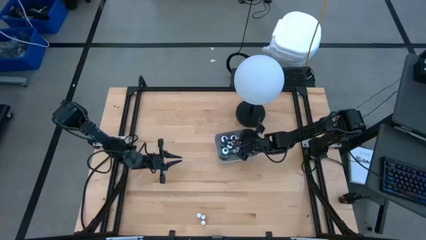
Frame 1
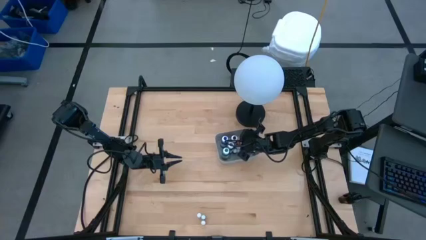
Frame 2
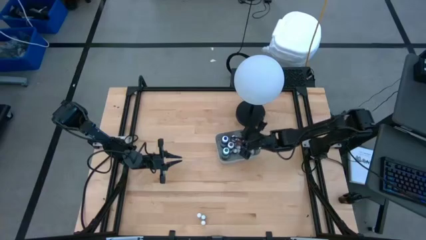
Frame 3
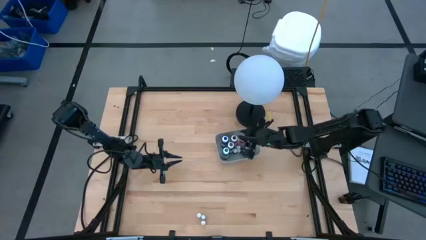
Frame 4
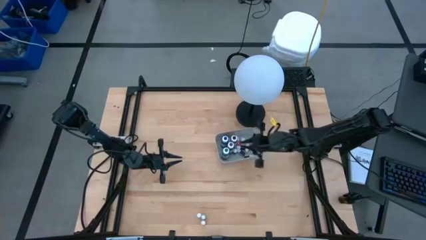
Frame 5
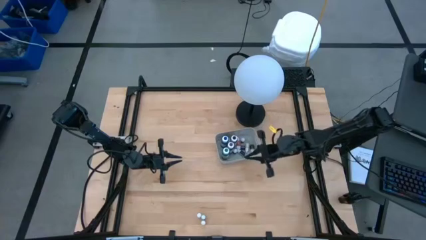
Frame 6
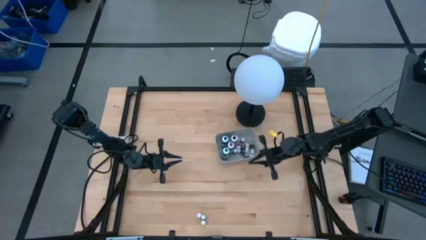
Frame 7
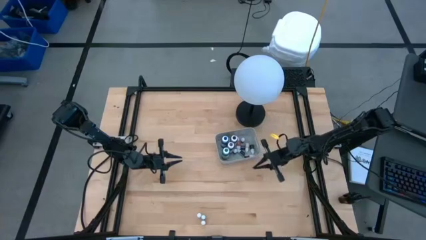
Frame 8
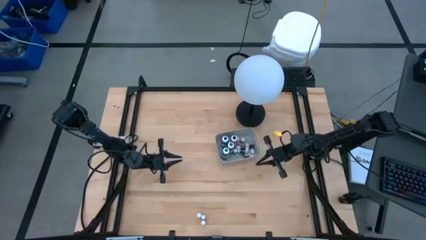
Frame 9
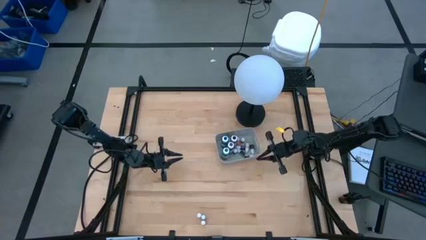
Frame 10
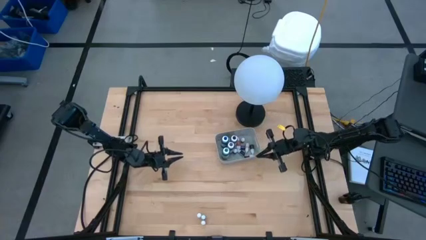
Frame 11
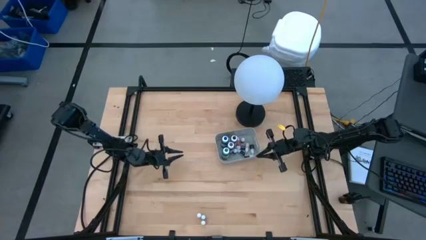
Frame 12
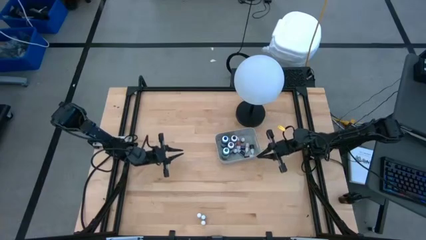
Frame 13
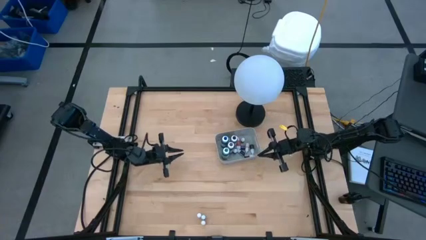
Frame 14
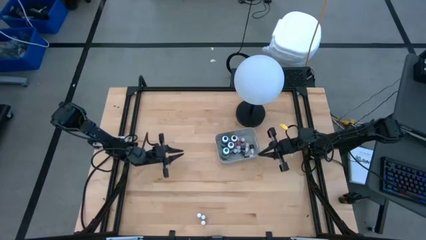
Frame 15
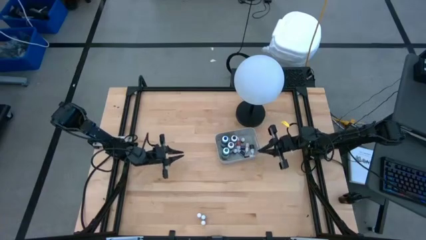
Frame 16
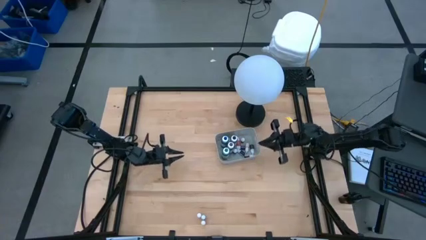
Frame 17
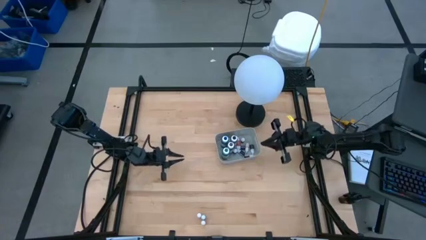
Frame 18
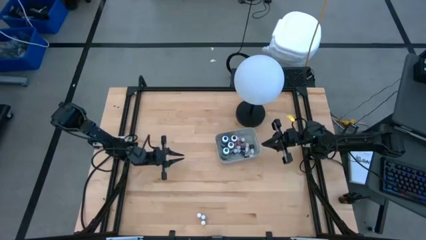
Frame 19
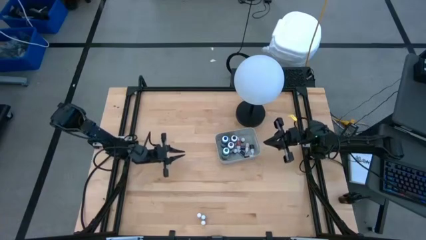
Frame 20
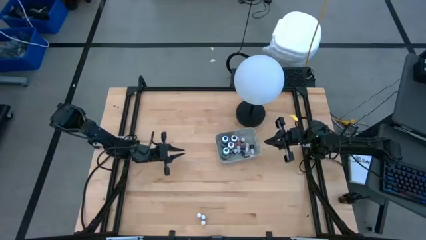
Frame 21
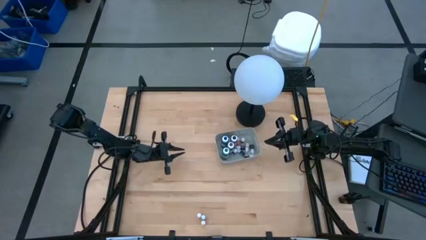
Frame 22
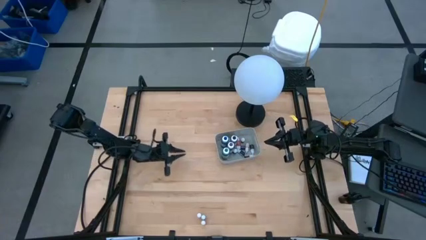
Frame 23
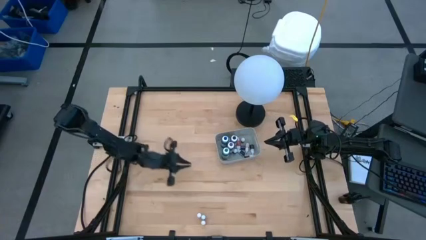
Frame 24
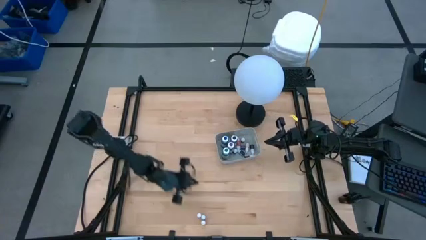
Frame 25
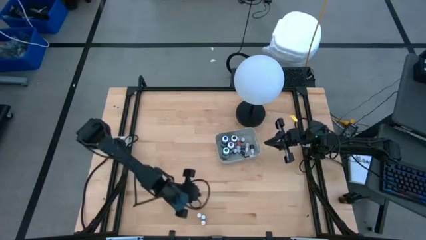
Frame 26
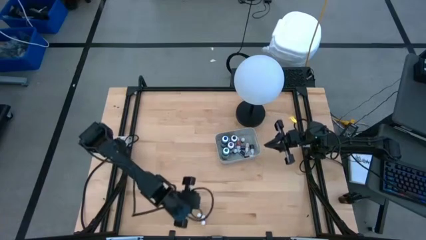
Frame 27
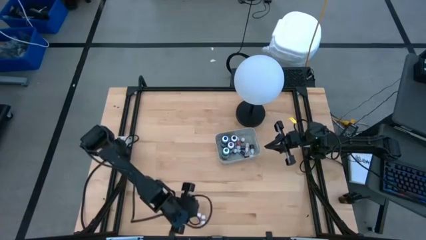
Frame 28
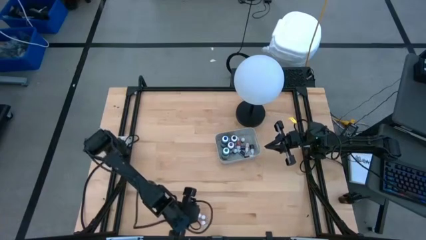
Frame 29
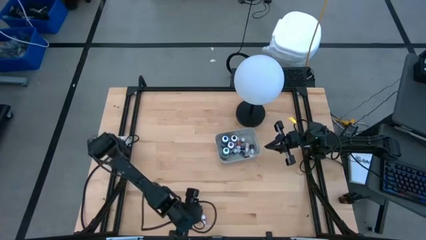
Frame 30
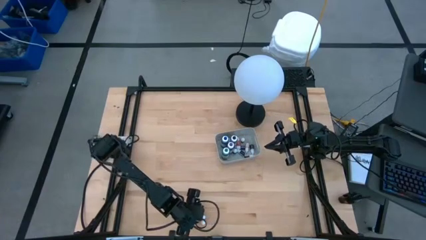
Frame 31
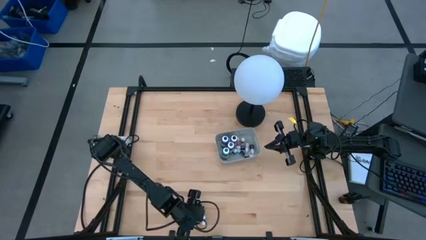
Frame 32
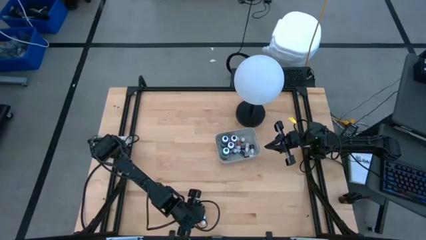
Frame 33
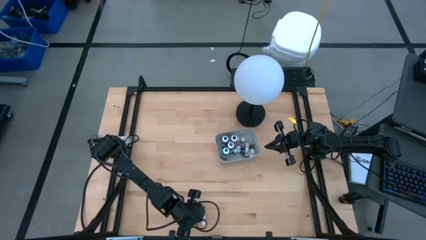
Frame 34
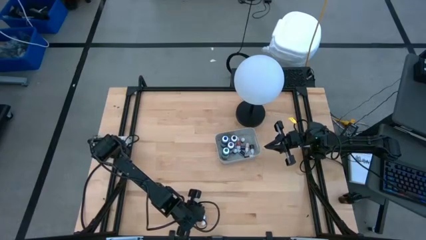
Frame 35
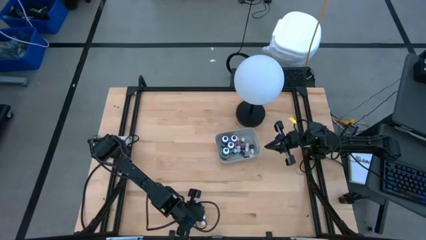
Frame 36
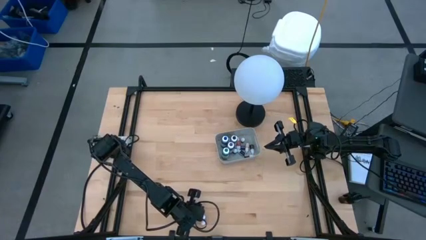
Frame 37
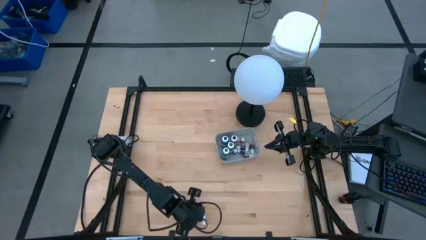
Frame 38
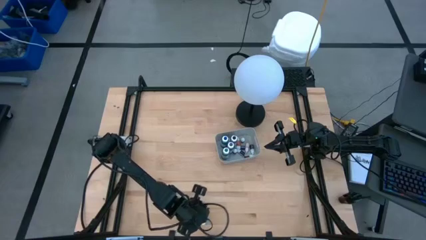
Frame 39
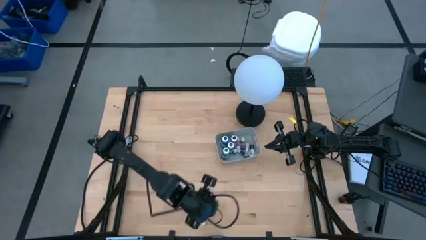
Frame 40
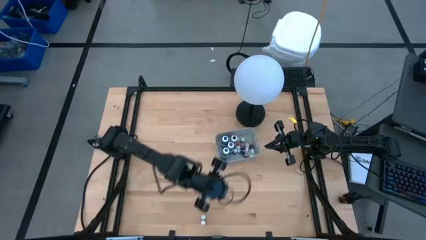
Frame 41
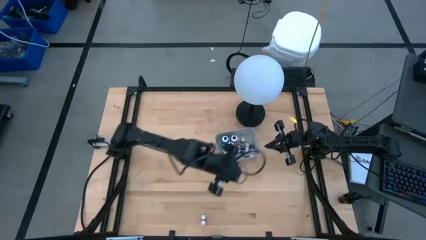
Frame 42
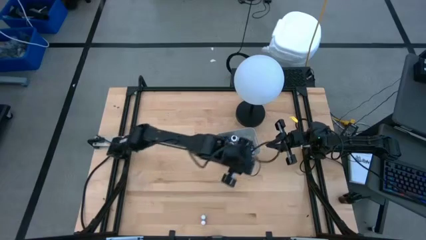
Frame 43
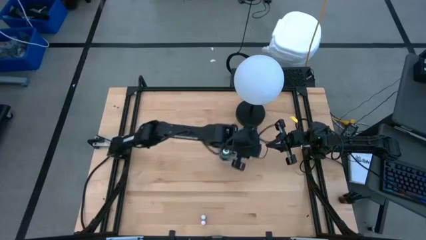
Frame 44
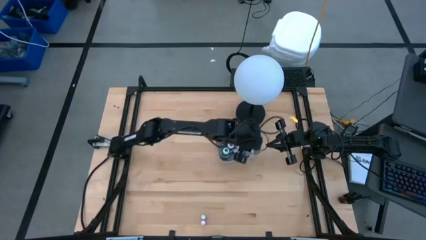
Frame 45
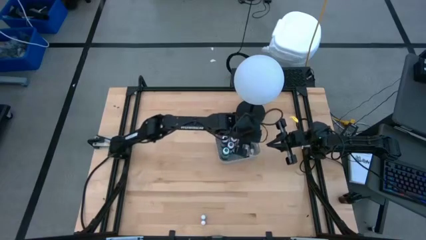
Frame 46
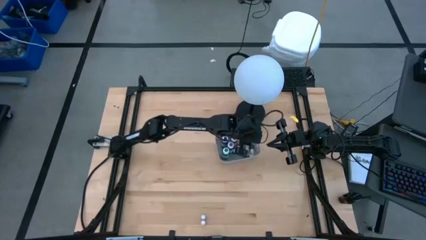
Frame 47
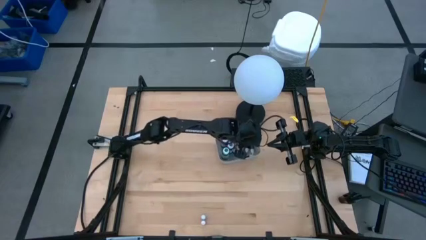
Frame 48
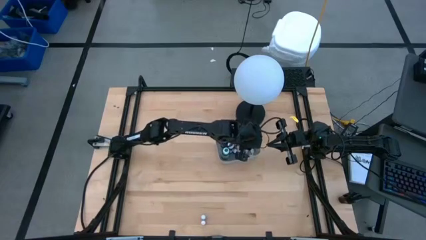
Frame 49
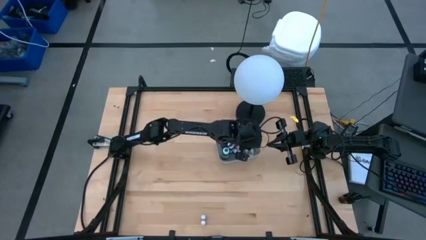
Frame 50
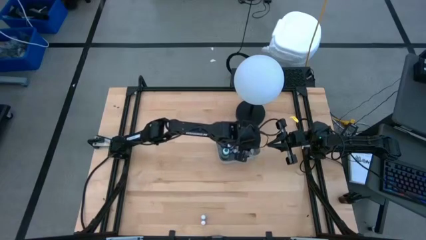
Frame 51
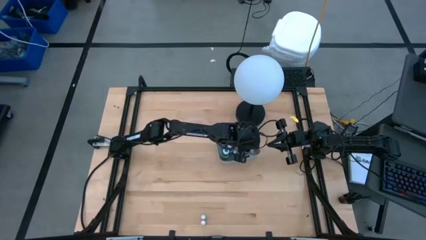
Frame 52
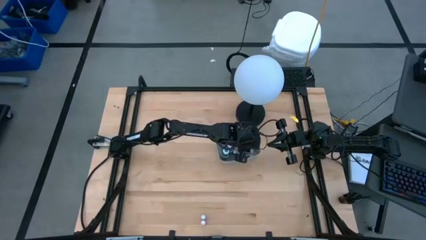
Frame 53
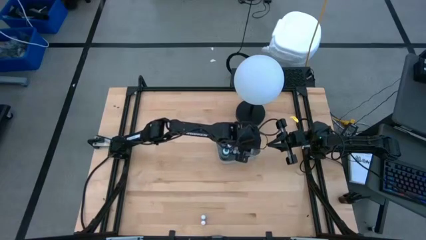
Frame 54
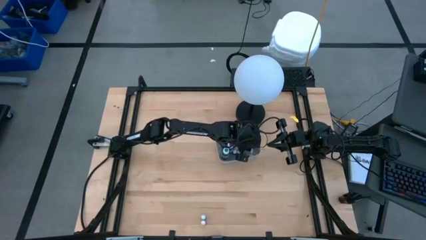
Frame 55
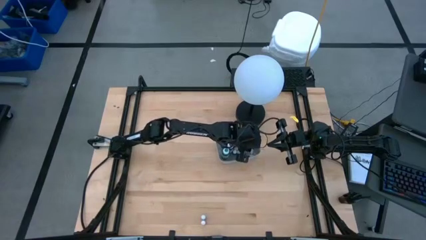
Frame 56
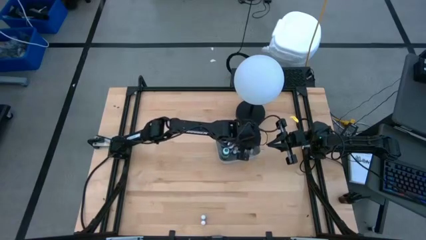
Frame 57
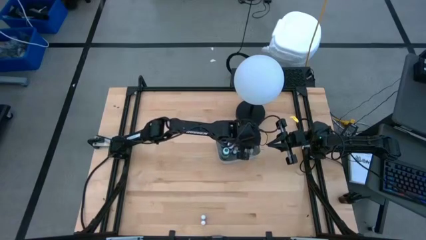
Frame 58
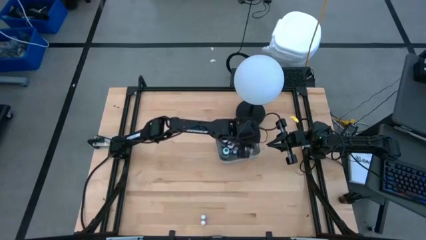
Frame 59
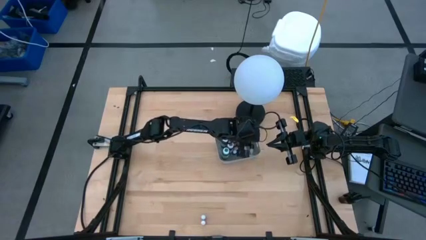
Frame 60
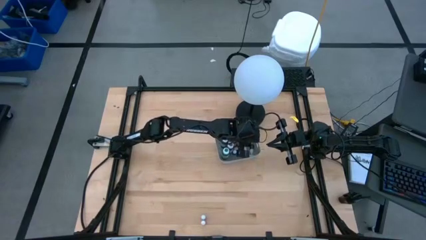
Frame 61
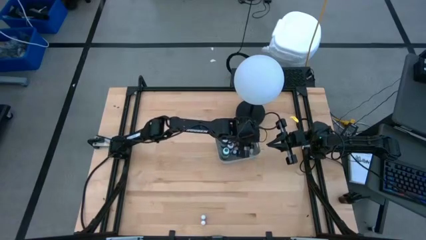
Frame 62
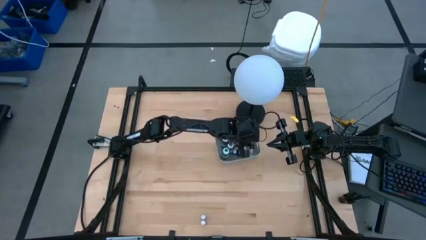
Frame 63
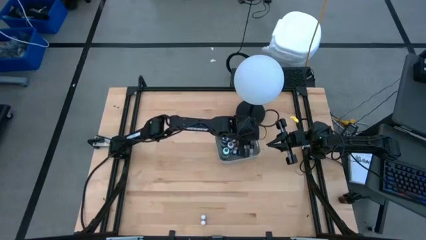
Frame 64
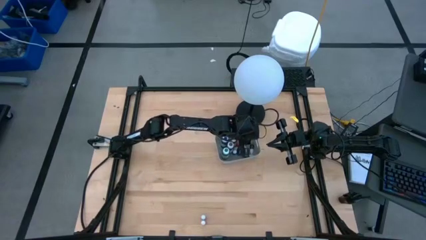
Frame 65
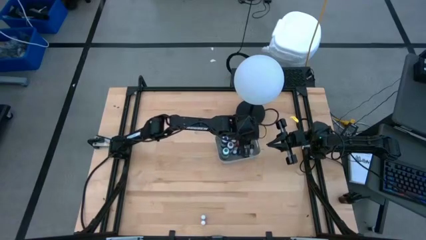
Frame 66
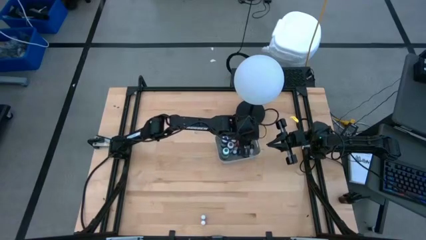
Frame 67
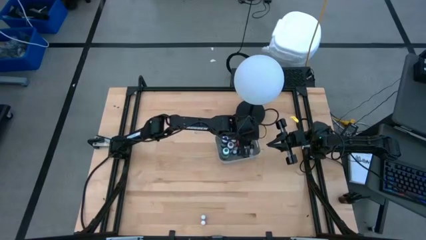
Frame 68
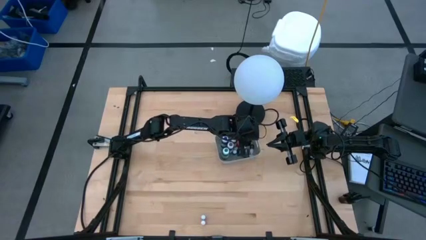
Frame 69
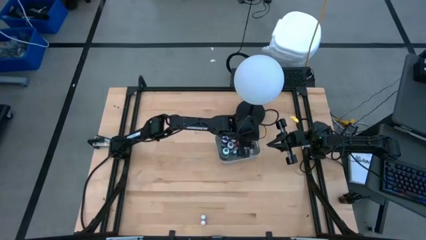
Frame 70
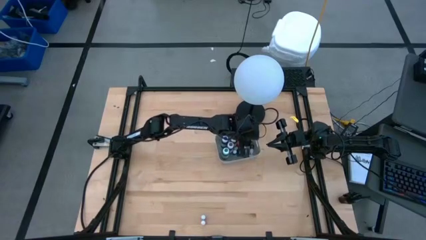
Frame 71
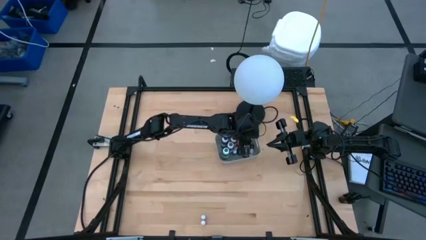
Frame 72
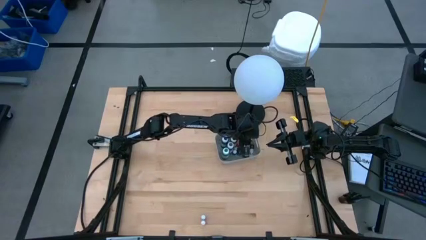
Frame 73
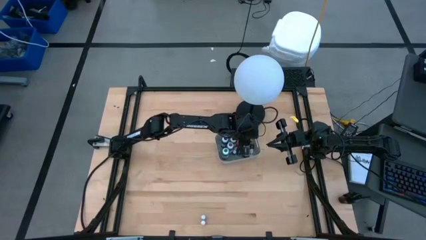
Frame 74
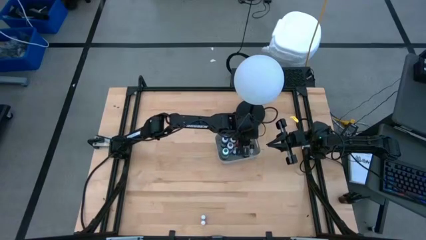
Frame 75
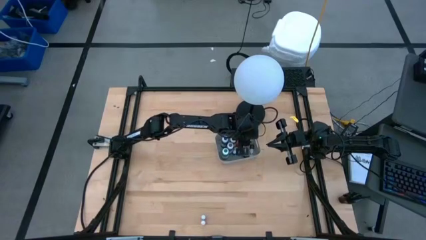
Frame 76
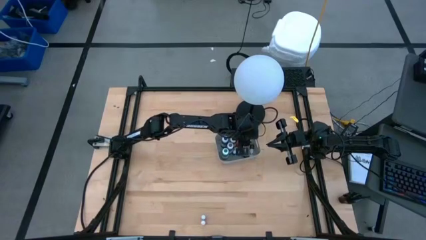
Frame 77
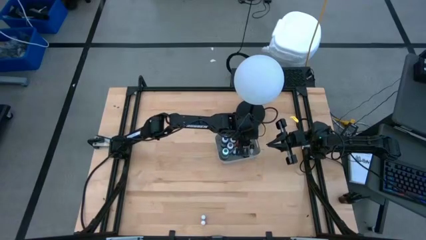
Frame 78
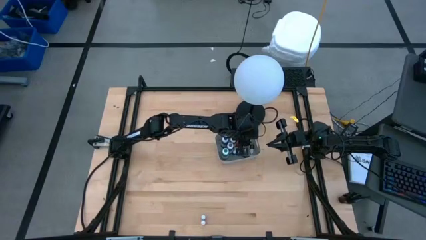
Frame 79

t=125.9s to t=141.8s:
Task: Pick & Place food coloring
Put the orange food coloring bottle into the gray bin
